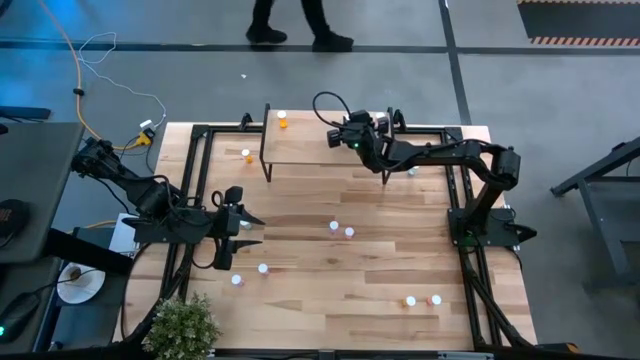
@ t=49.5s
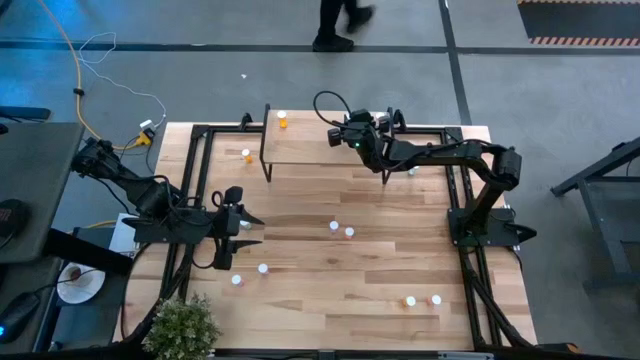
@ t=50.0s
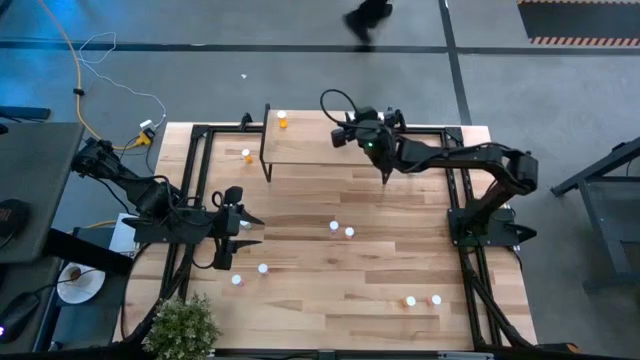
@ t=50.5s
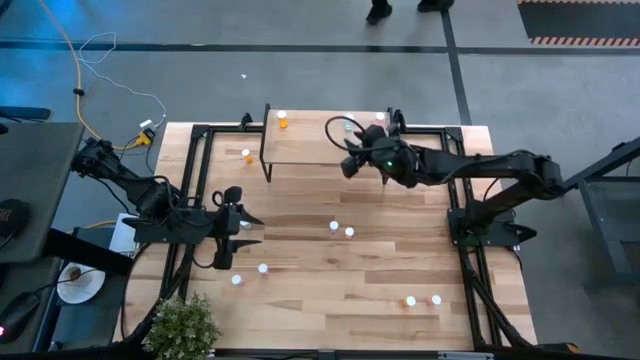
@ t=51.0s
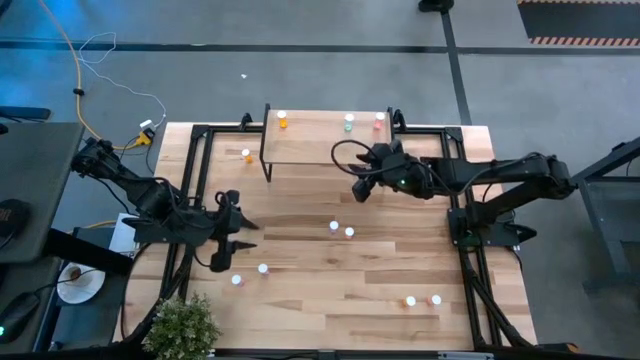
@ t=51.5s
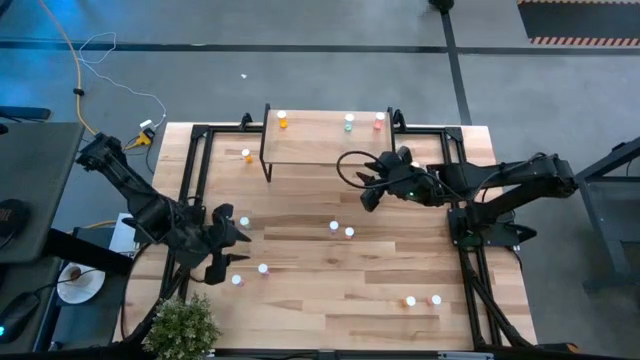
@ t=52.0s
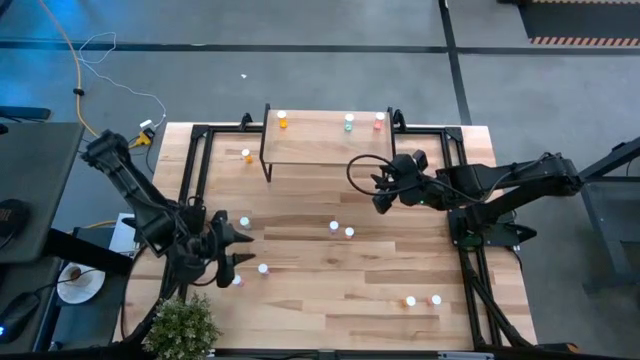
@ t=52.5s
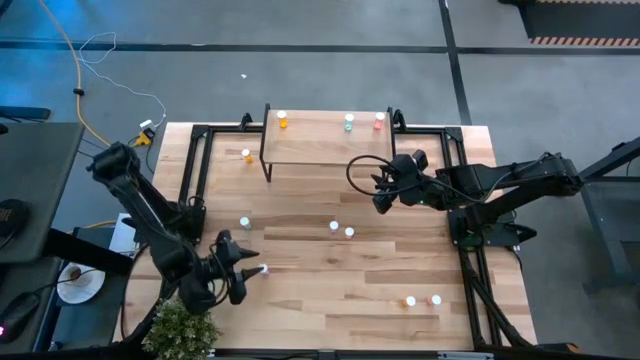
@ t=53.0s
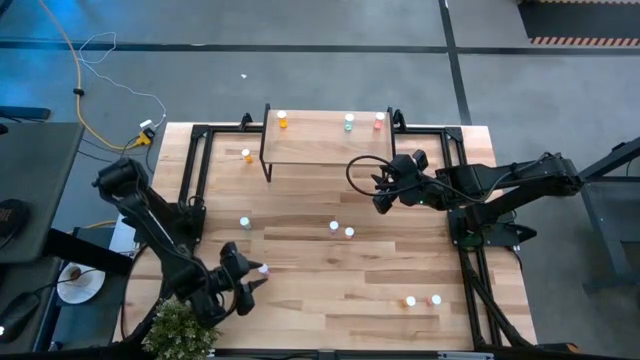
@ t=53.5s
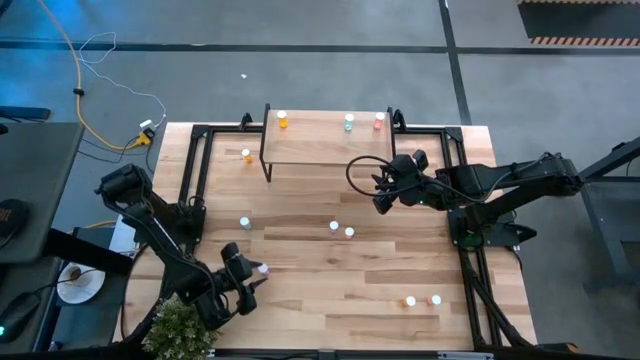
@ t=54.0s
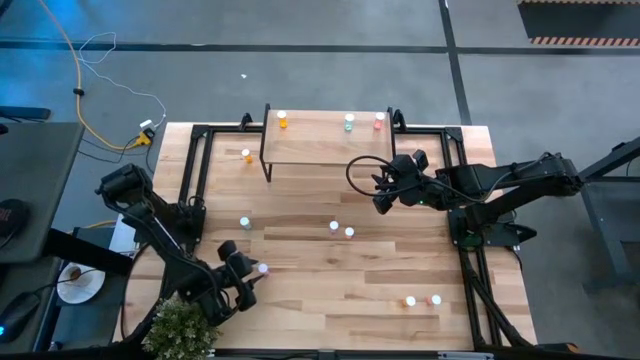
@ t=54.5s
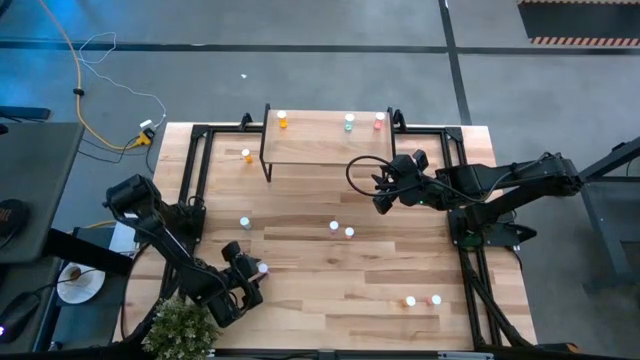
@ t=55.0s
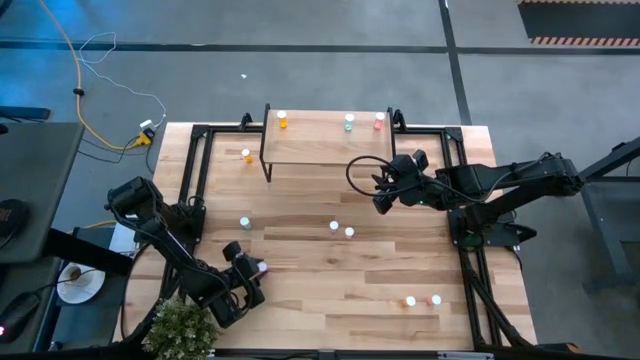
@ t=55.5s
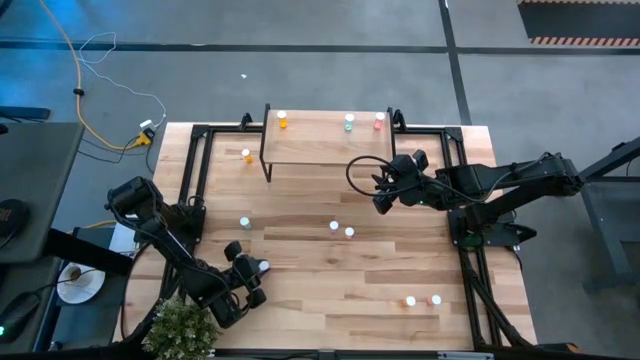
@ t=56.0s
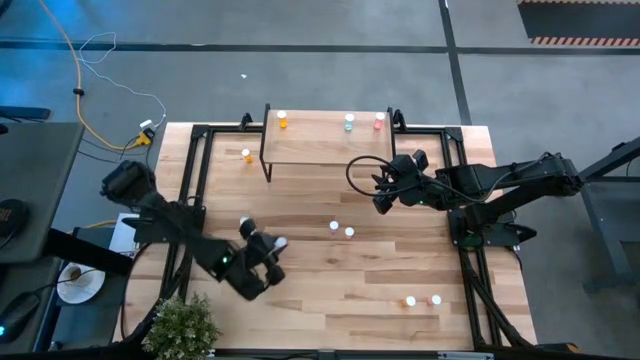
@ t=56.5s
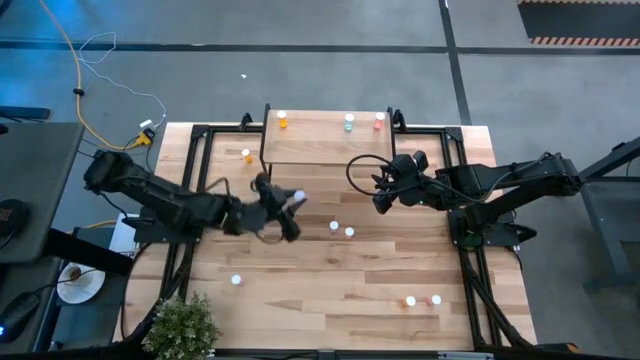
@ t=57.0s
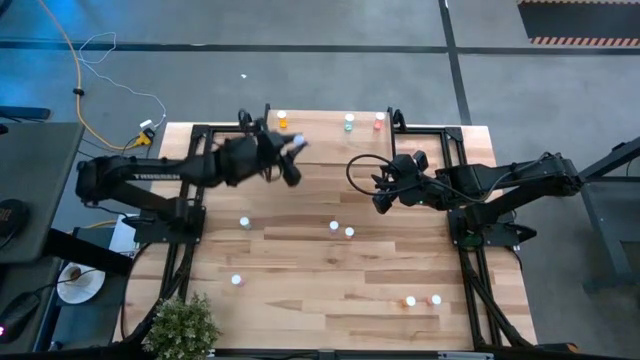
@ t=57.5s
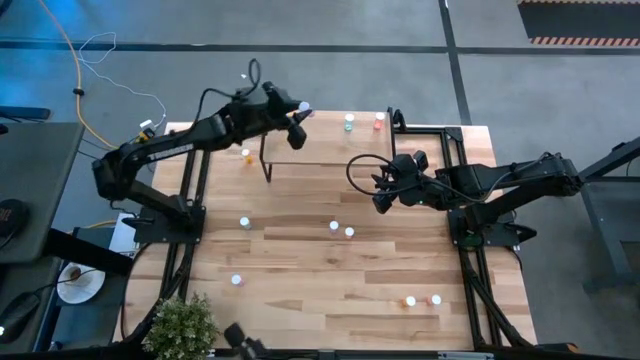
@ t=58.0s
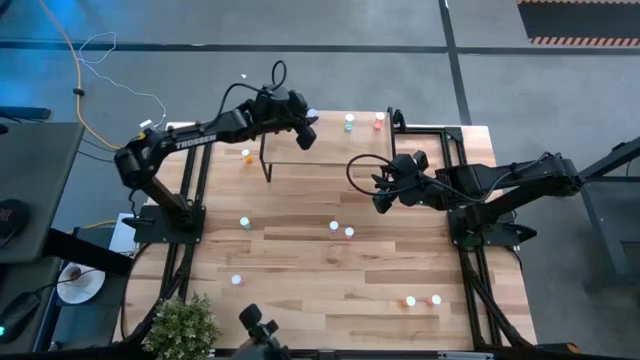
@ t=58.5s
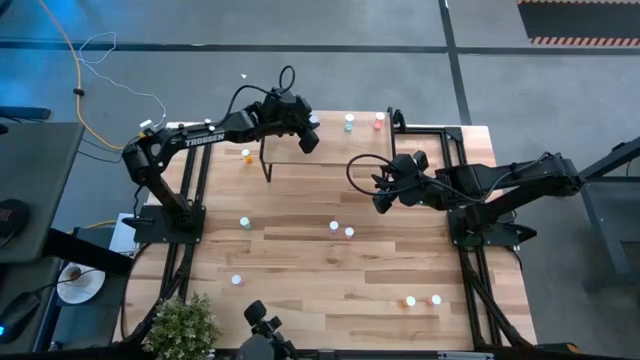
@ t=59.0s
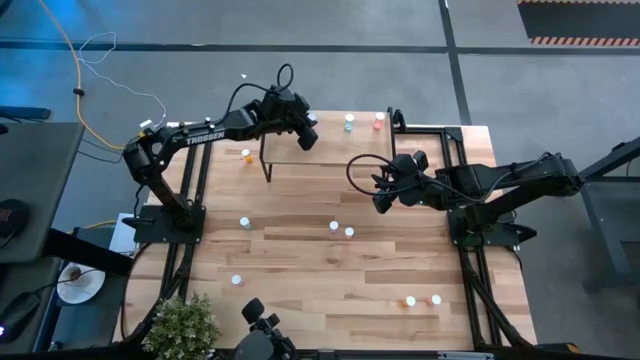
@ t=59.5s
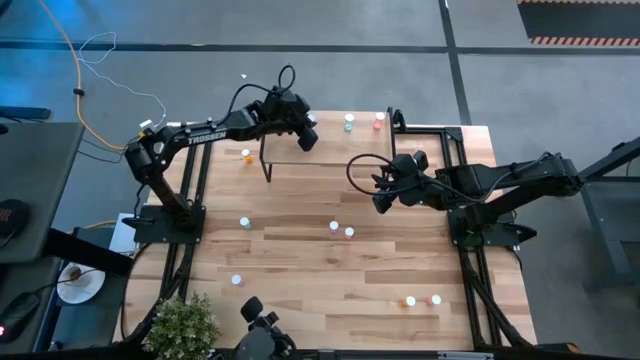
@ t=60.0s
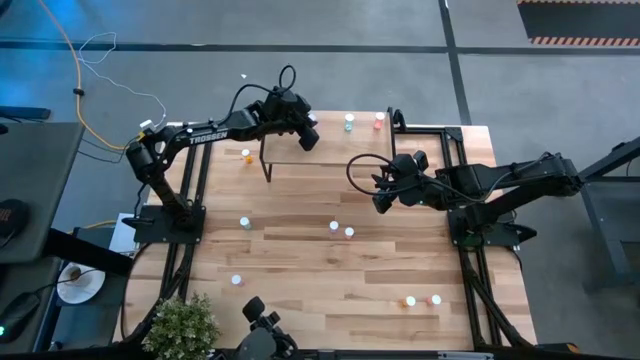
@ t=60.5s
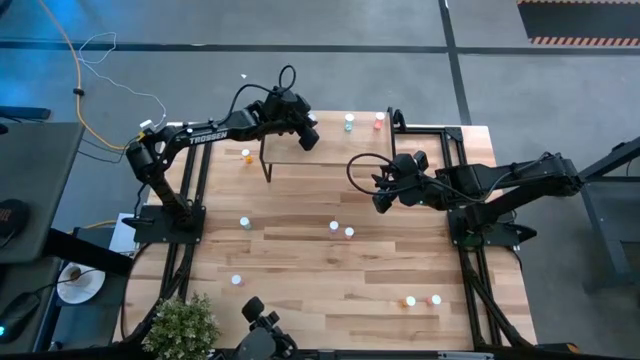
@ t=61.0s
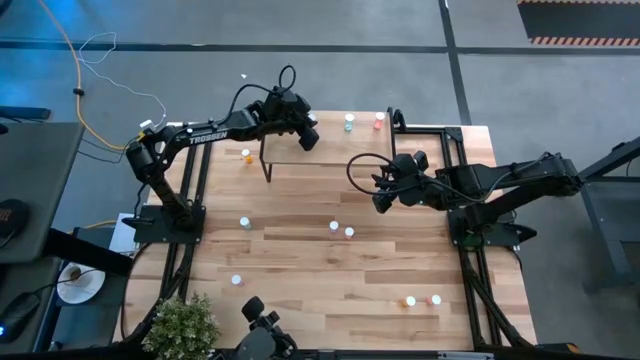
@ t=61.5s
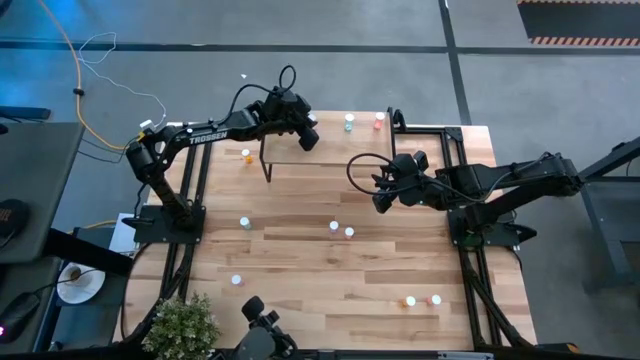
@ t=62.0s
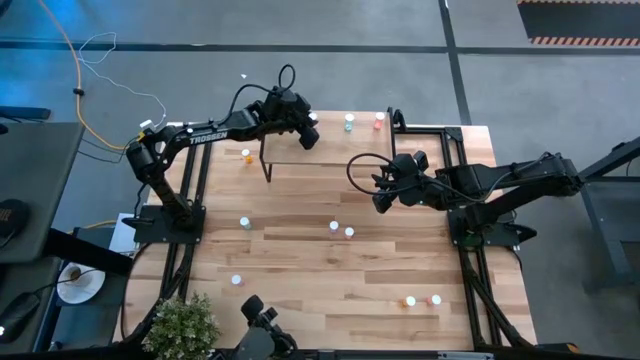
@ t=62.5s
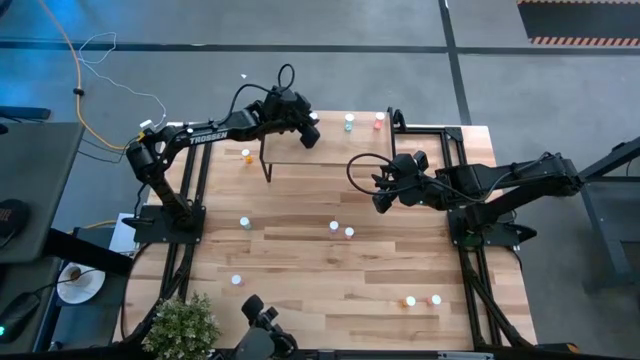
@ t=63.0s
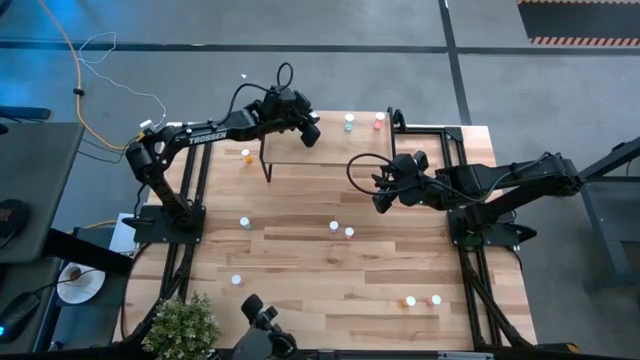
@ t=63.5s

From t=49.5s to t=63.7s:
Task: Pick and place medicine bottles onto shelf by color
Put the middle purple pill bottle on the shelf

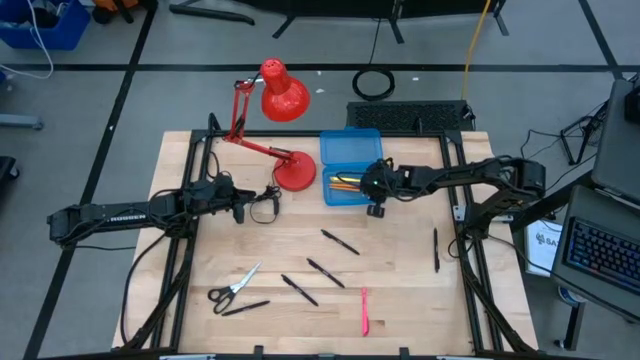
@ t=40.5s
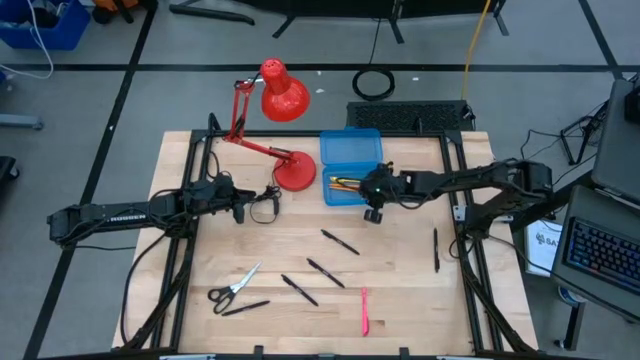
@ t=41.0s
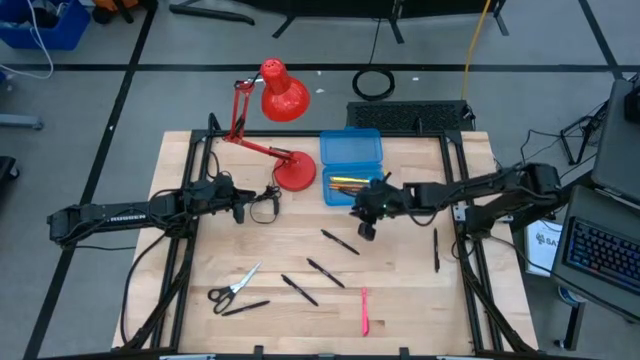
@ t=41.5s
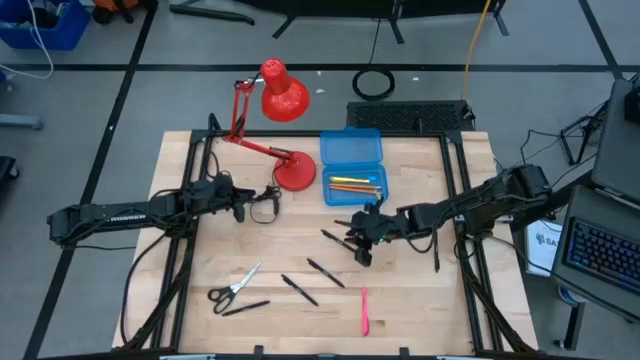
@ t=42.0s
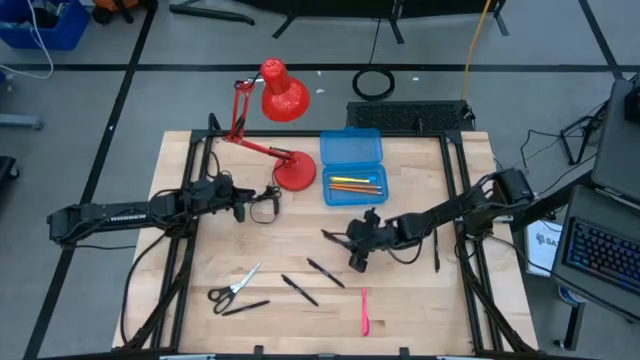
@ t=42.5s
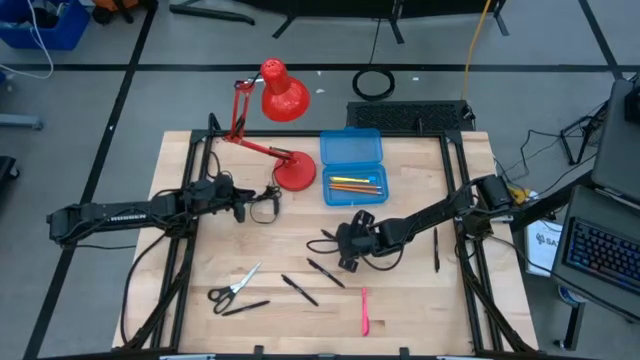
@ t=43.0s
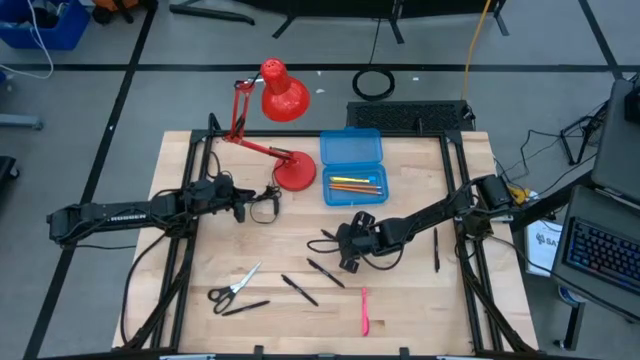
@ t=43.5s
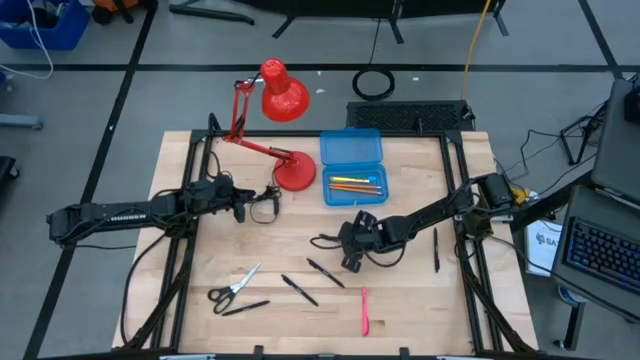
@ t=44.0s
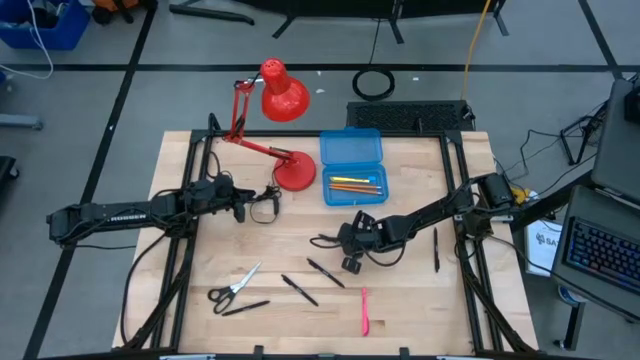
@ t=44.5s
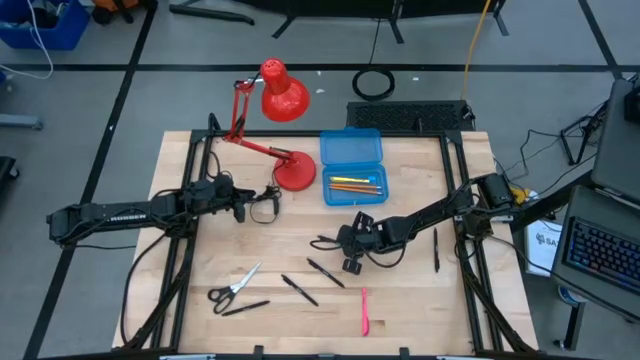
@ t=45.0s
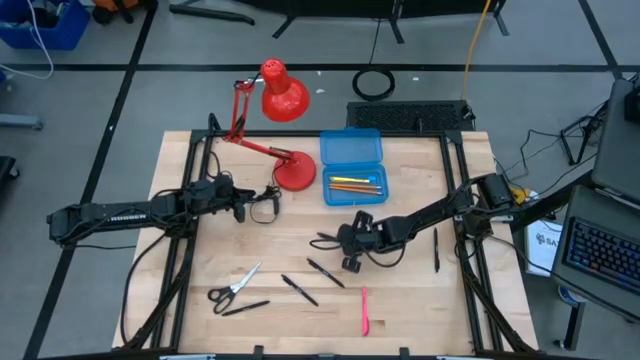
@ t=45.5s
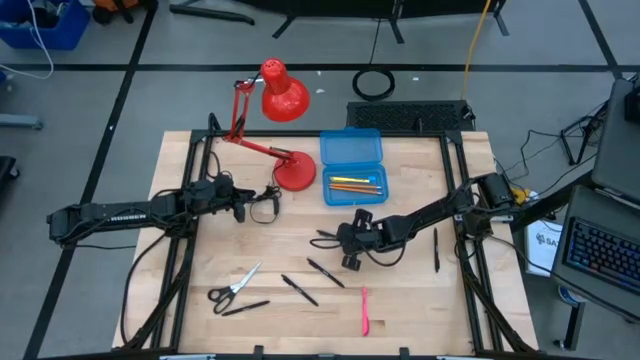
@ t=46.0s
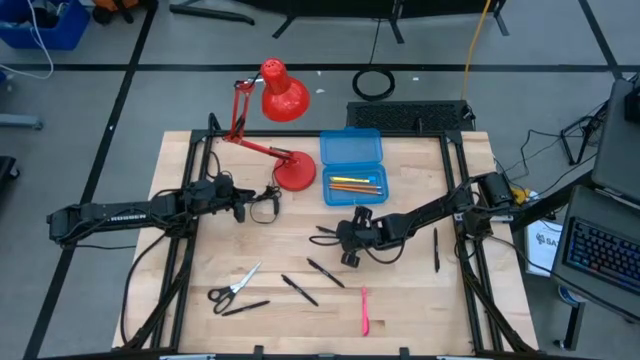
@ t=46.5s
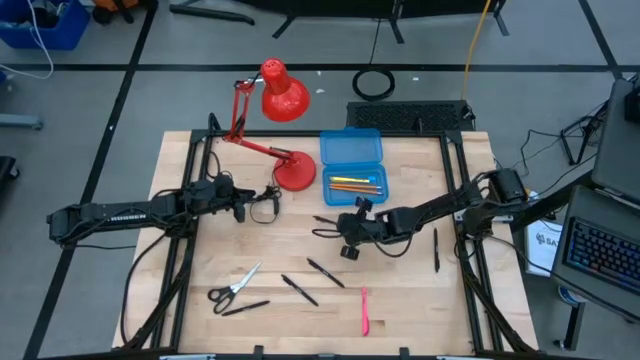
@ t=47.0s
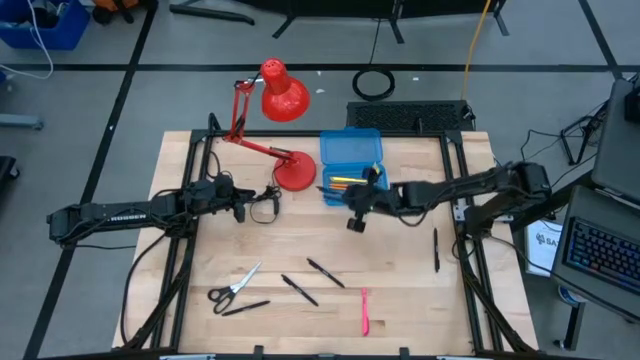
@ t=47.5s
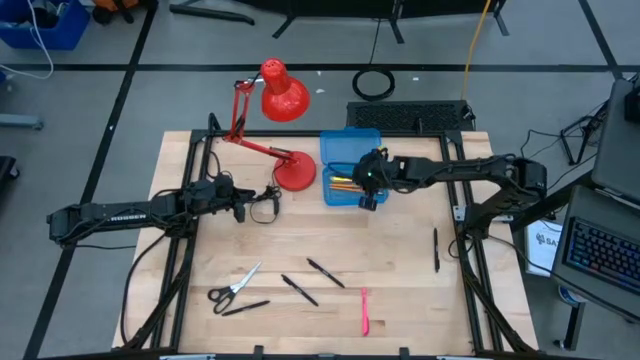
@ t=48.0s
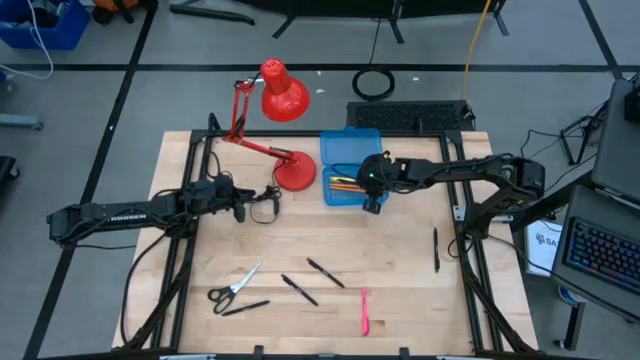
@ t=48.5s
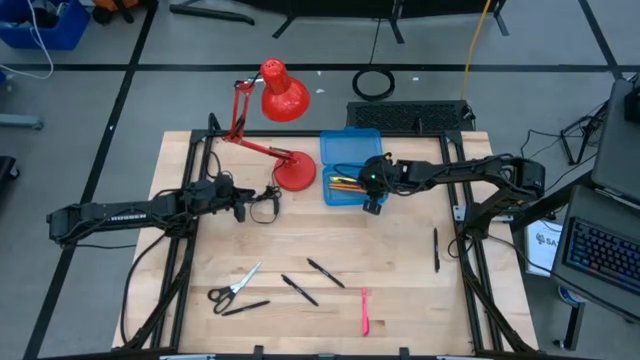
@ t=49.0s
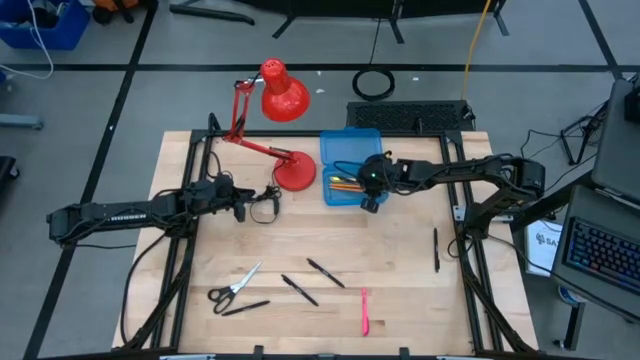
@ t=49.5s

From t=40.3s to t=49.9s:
Task: Pick & place school supplies into a supply box
Put the black pen into the blue supply box
